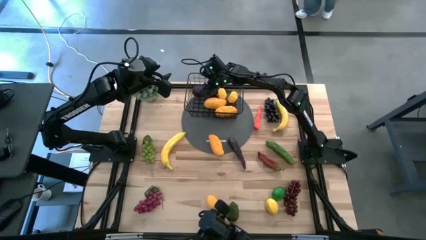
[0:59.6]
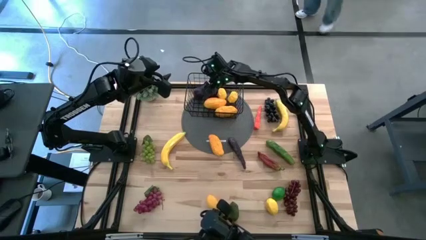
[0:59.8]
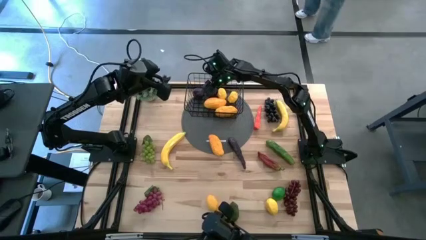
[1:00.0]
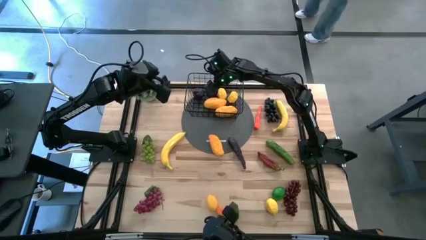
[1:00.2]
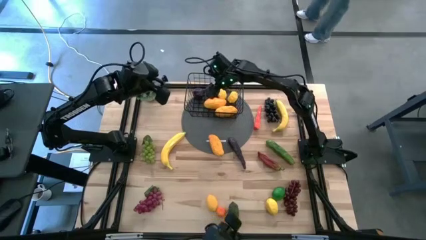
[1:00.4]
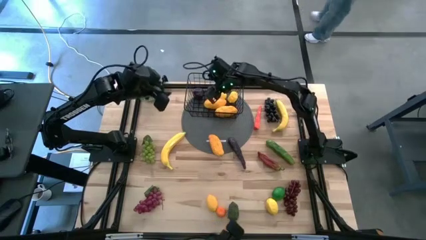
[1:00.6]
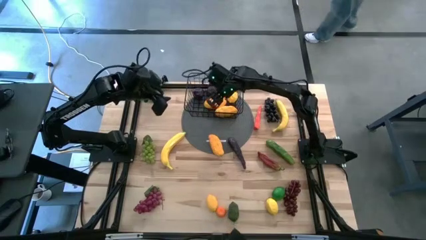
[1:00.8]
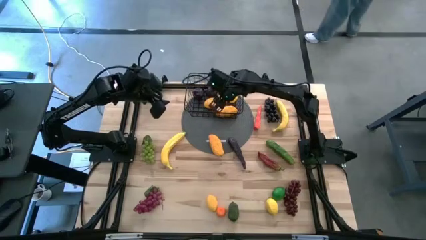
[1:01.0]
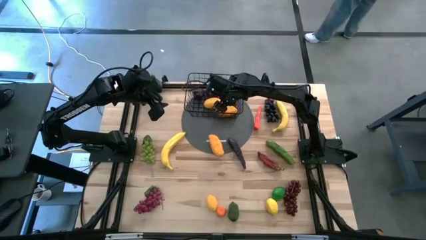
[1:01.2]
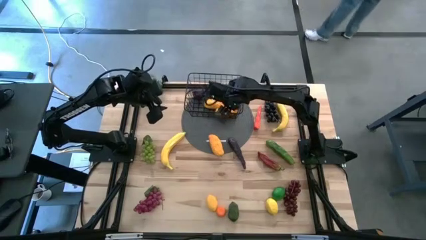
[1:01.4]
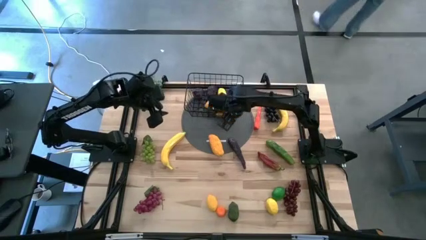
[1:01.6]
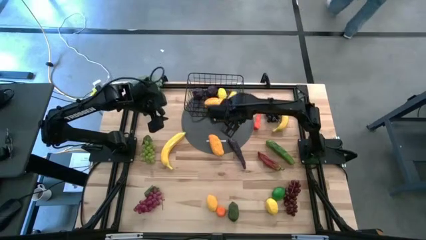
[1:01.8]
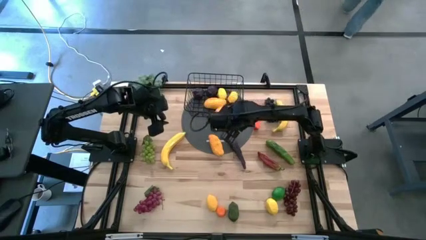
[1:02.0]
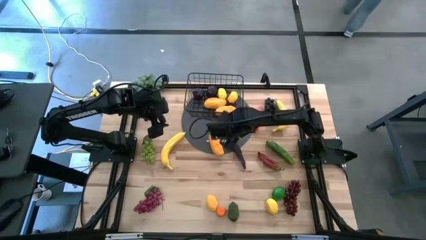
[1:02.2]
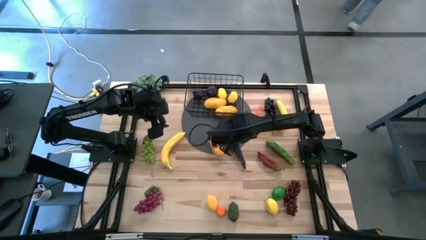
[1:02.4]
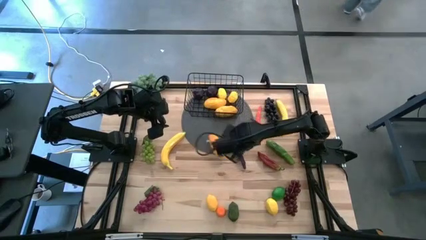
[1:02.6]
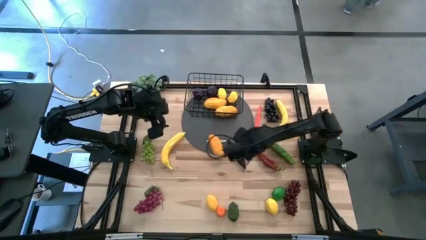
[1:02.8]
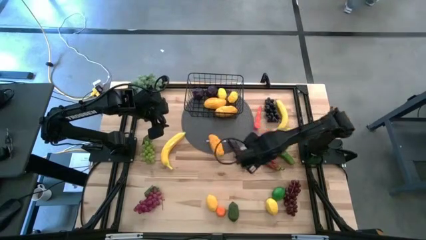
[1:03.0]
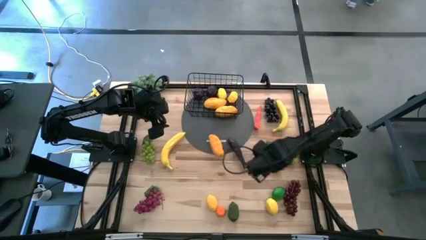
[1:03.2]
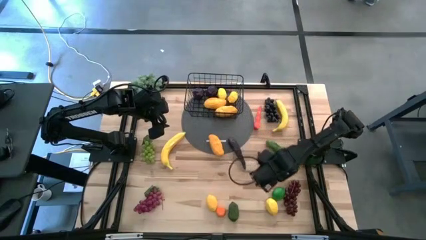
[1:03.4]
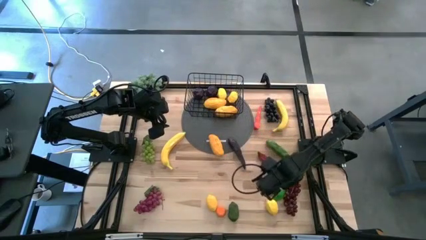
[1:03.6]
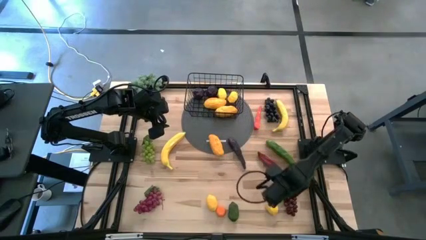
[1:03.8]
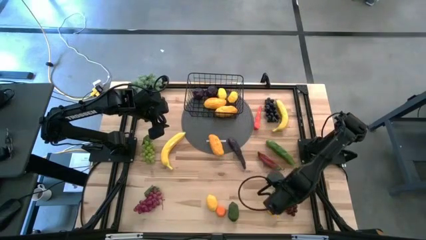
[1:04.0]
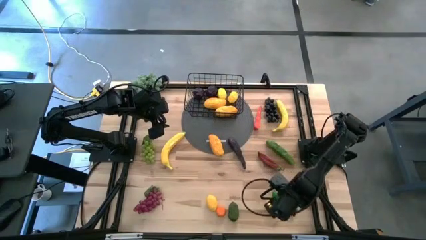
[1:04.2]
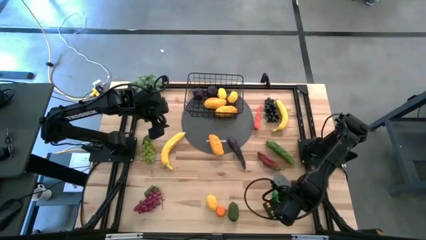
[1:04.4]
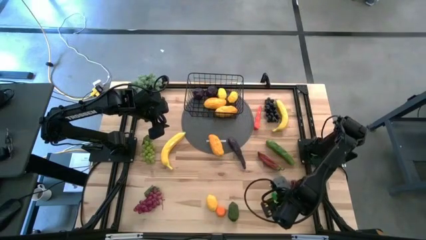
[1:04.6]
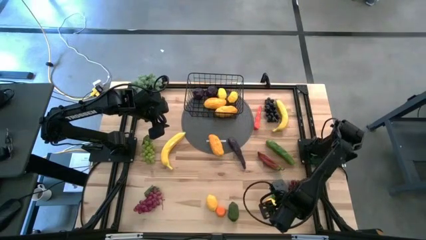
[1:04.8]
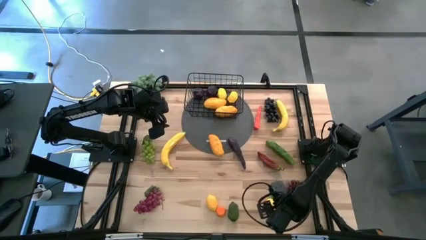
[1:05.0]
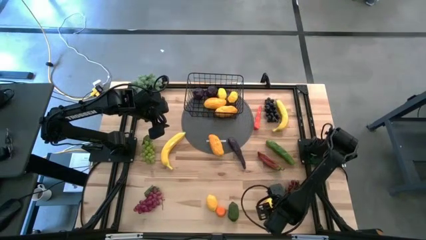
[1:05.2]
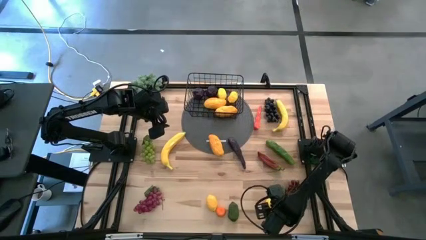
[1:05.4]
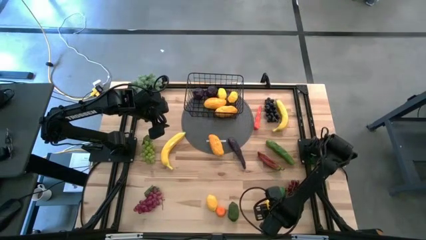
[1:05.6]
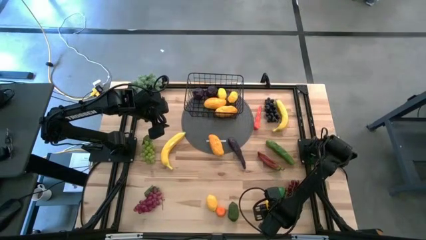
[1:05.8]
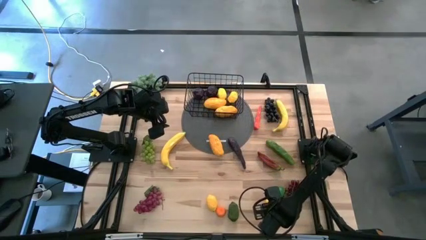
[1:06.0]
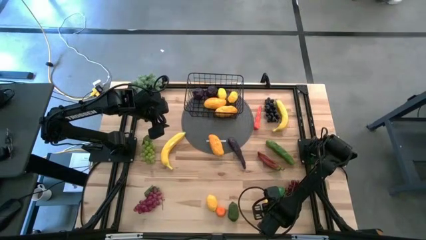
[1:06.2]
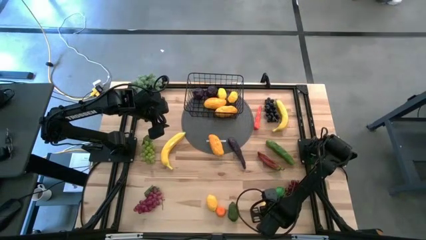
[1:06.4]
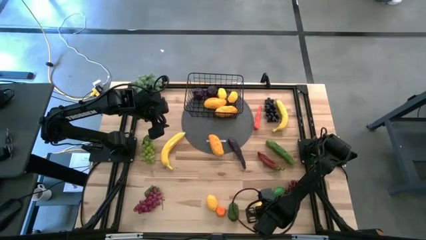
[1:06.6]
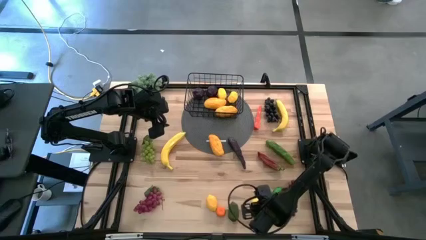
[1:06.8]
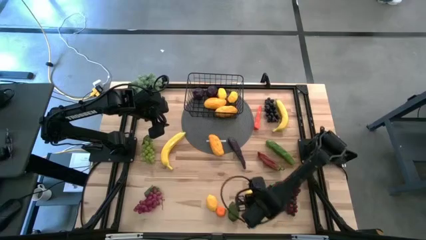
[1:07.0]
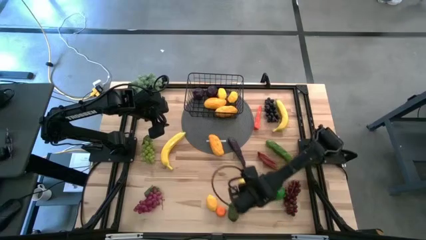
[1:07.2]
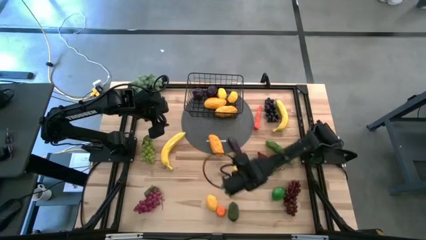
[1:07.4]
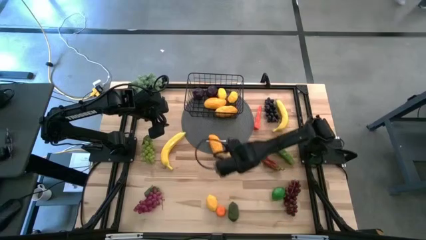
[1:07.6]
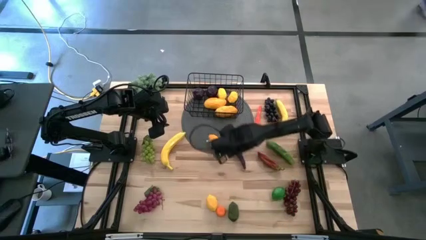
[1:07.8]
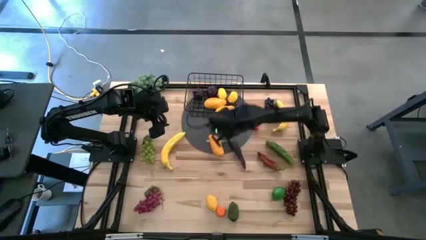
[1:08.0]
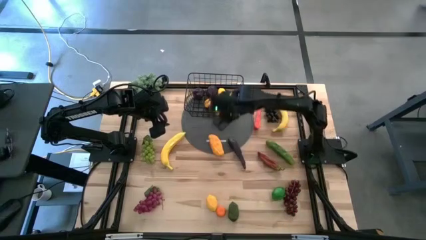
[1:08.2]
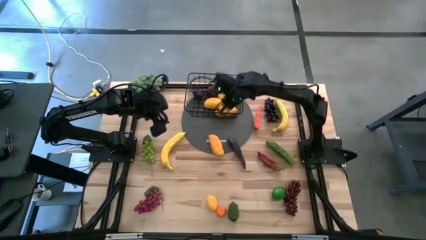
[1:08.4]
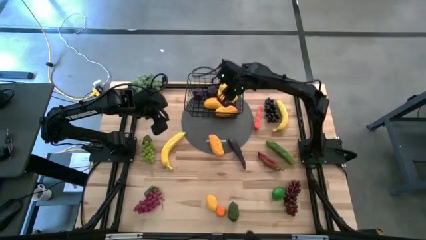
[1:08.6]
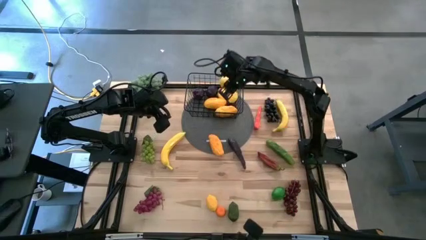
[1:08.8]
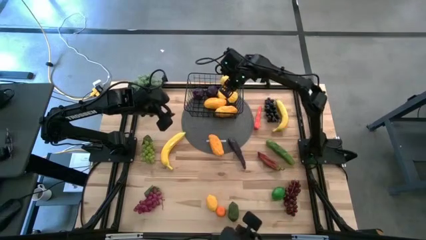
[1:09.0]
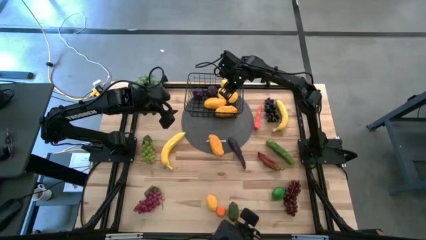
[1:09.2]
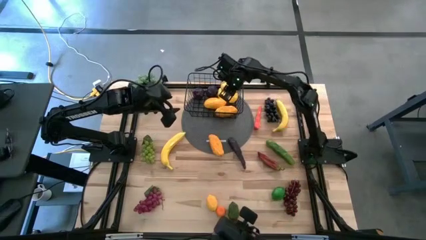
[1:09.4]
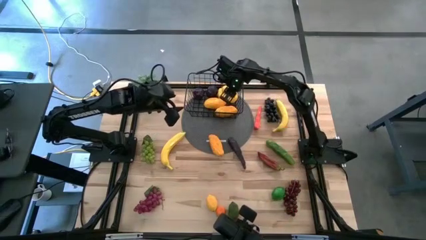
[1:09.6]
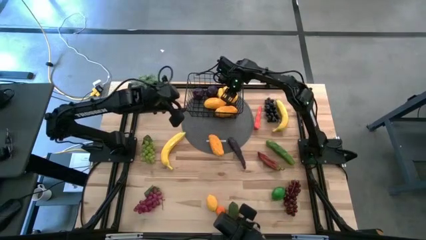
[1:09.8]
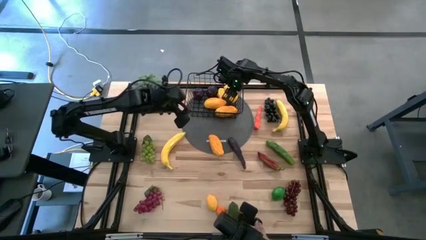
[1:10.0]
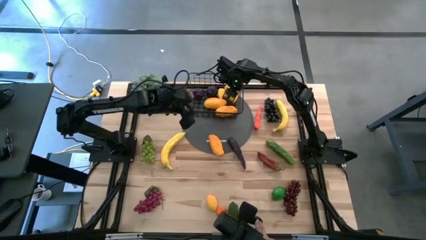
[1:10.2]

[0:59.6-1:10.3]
Task: Build produce basket
Put the lemon into the black wire basket

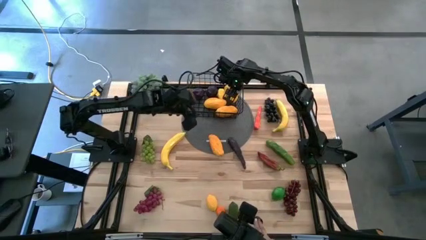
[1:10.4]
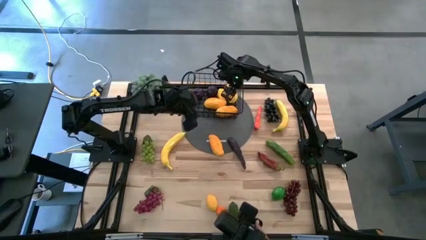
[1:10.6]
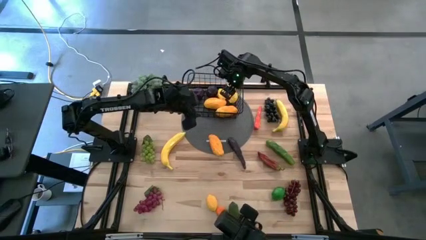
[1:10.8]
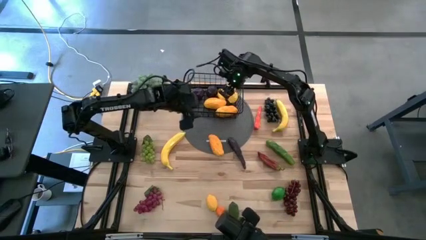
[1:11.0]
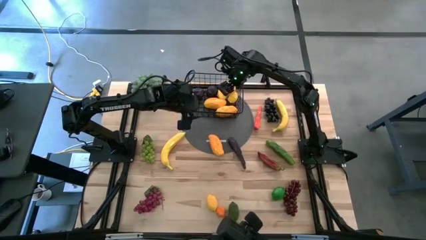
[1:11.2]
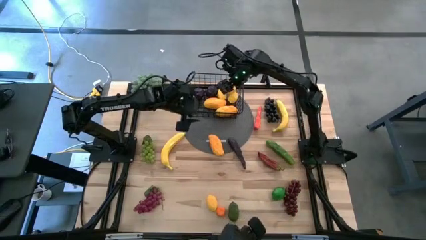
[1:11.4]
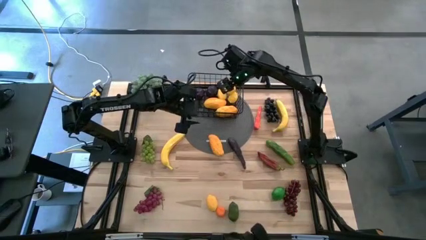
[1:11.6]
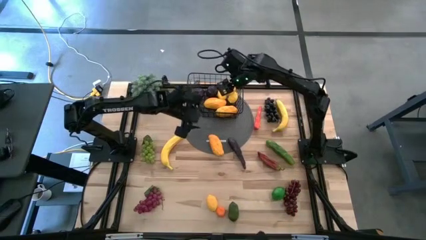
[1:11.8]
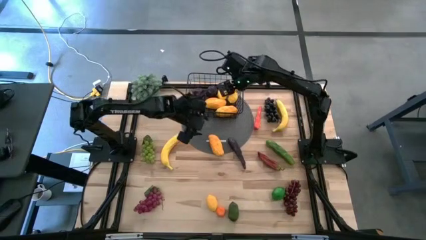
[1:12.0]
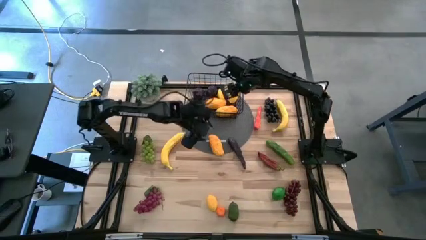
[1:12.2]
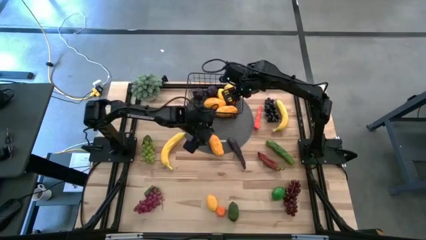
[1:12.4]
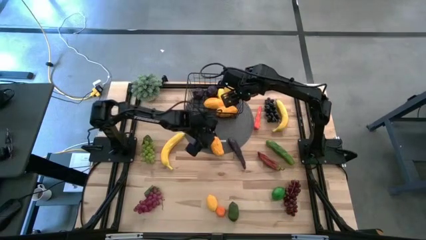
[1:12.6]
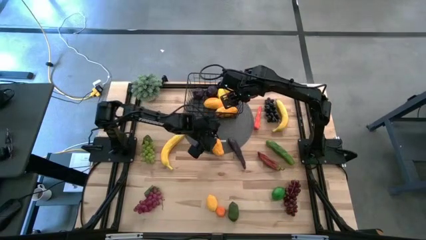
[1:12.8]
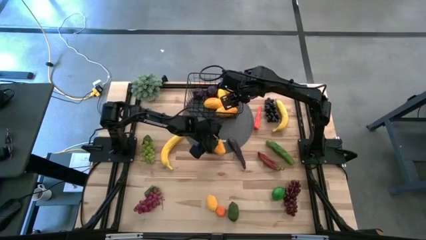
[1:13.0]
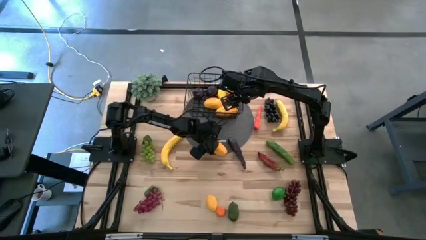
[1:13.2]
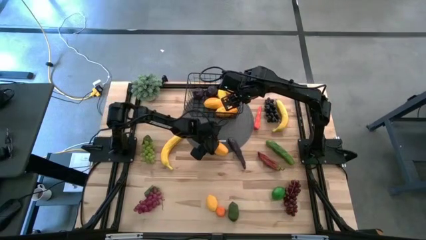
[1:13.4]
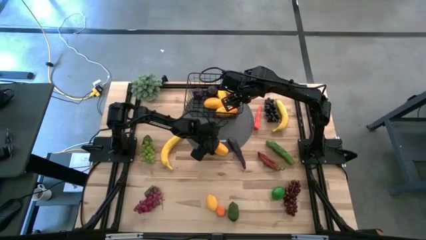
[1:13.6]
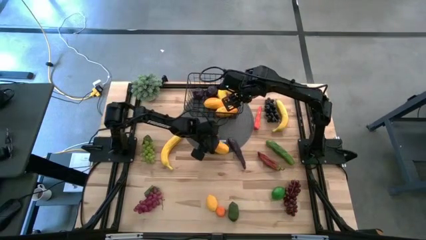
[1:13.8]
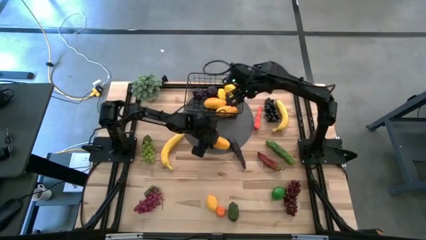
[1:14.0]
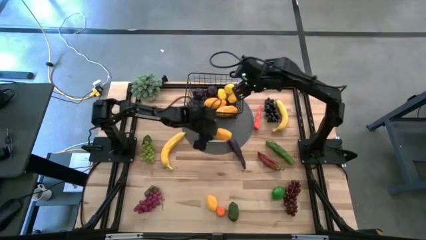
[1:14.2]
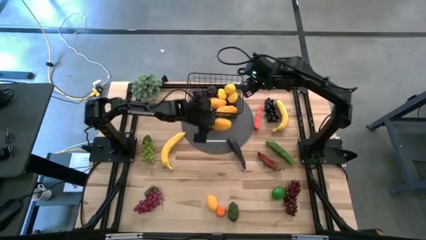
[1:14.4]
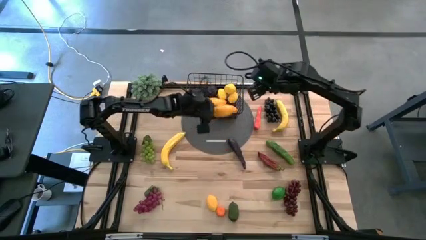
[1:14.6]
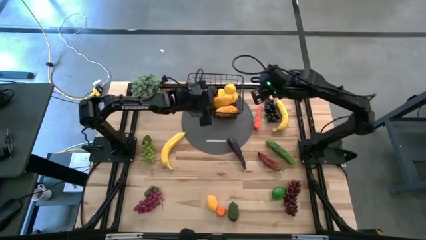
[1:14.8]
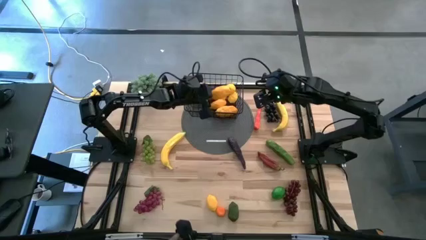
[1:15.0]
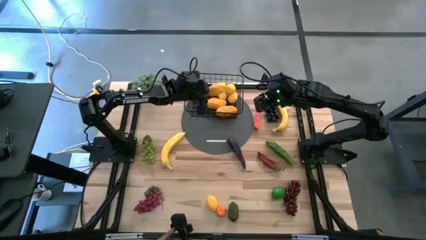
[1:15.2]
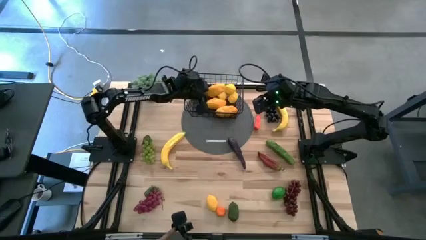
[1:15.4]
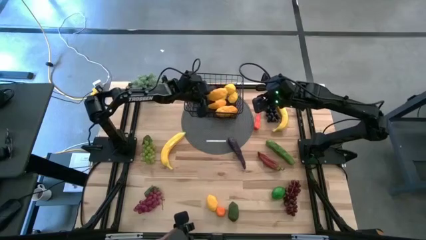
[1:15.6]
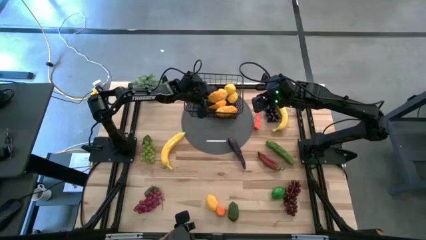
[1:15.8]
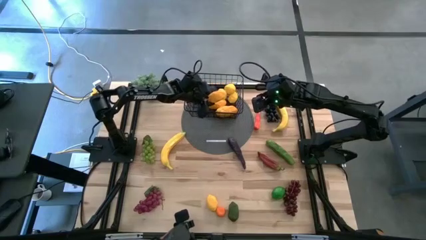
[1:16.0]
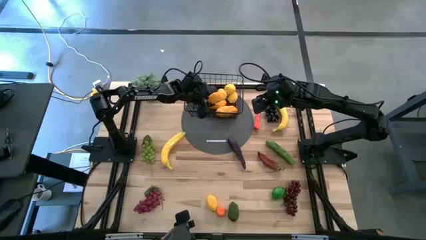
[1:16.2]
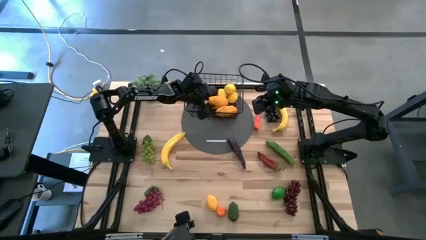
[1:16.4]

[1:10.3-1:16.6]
Put the mango into the black wire basket
